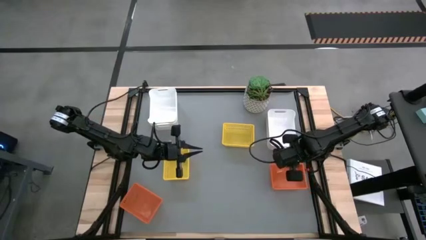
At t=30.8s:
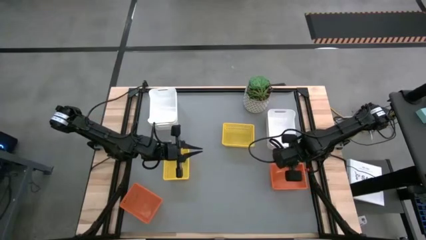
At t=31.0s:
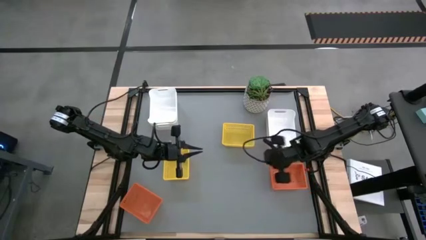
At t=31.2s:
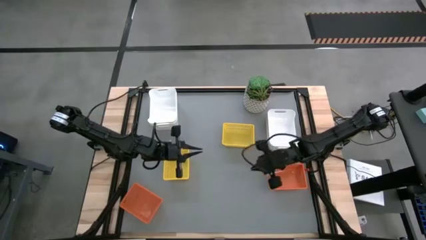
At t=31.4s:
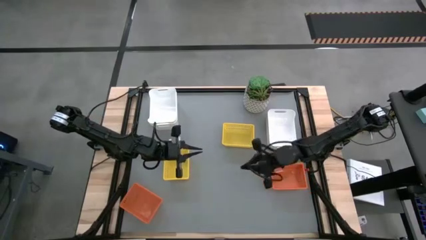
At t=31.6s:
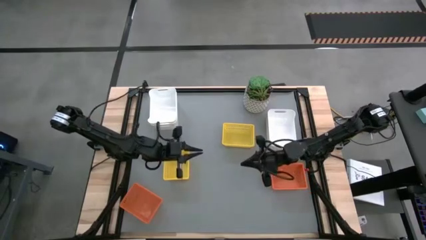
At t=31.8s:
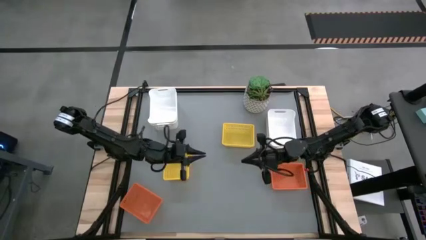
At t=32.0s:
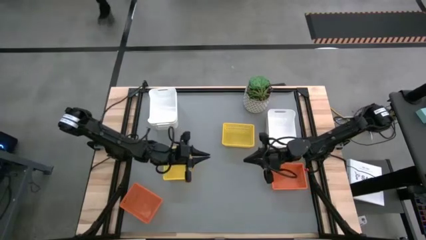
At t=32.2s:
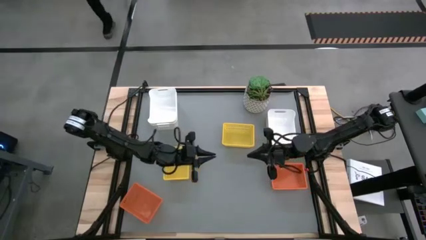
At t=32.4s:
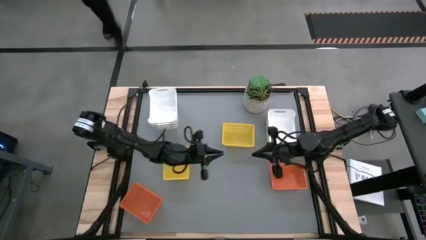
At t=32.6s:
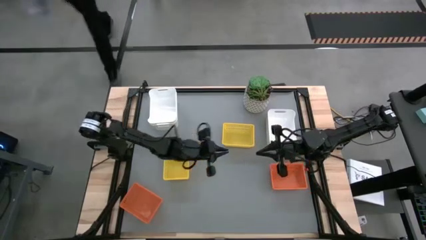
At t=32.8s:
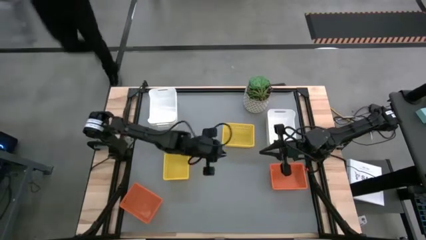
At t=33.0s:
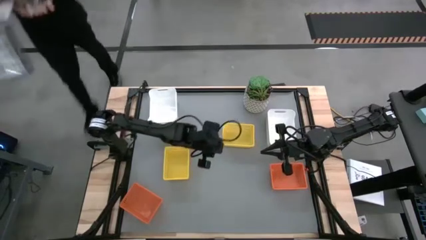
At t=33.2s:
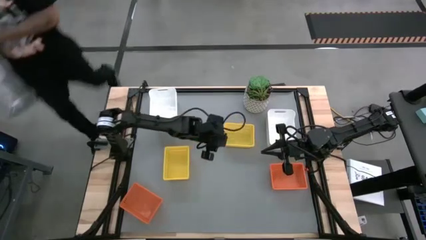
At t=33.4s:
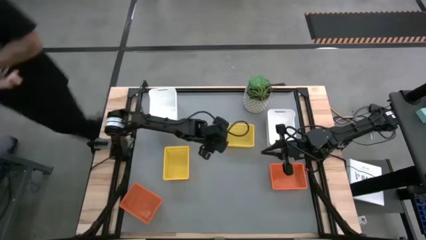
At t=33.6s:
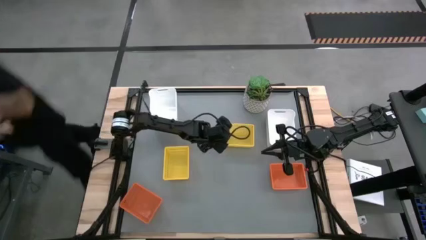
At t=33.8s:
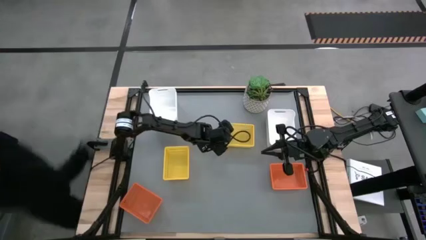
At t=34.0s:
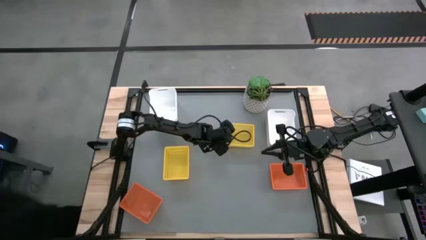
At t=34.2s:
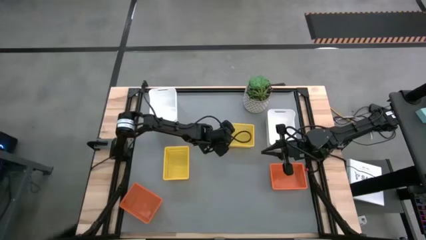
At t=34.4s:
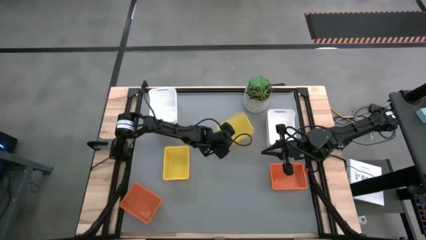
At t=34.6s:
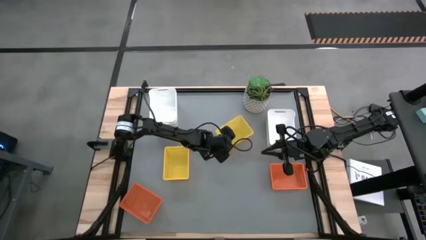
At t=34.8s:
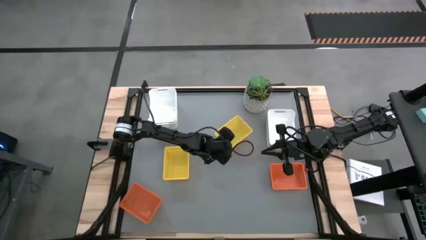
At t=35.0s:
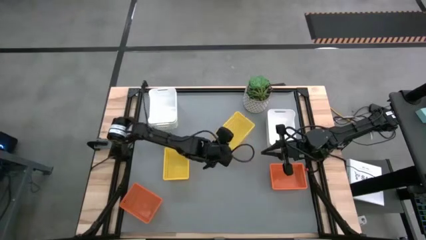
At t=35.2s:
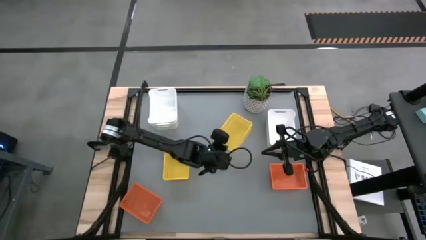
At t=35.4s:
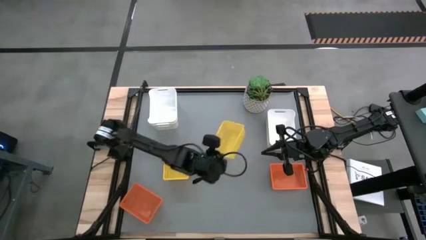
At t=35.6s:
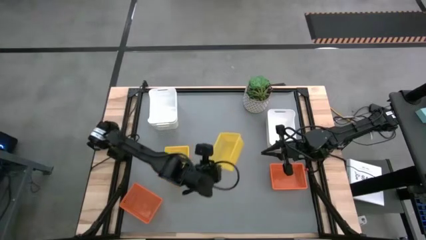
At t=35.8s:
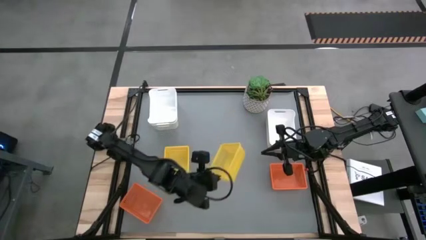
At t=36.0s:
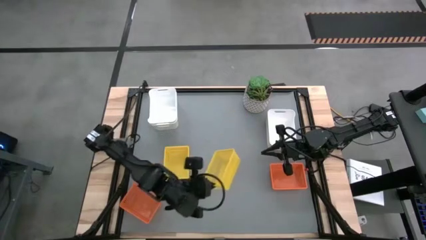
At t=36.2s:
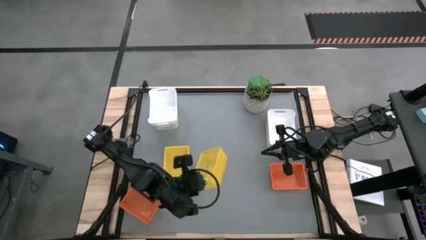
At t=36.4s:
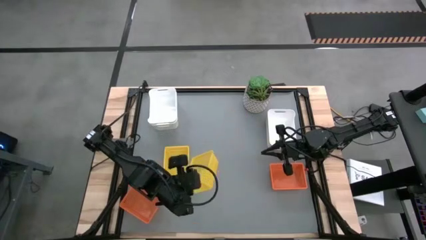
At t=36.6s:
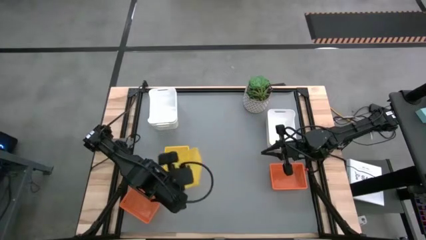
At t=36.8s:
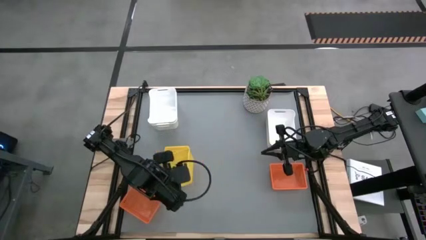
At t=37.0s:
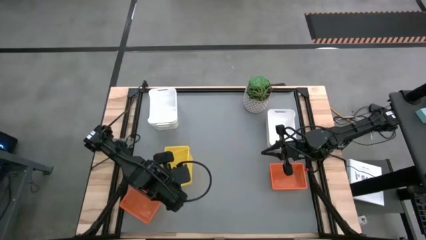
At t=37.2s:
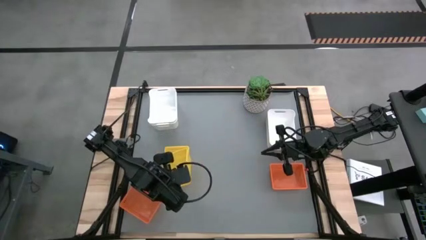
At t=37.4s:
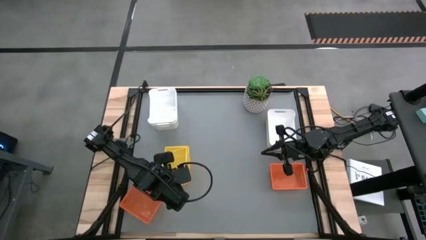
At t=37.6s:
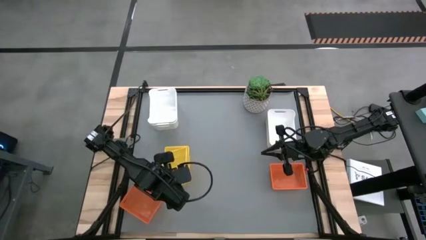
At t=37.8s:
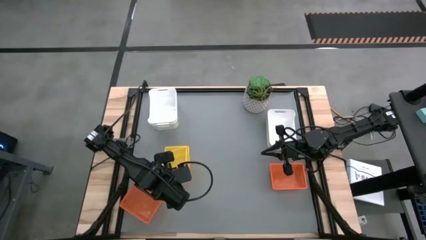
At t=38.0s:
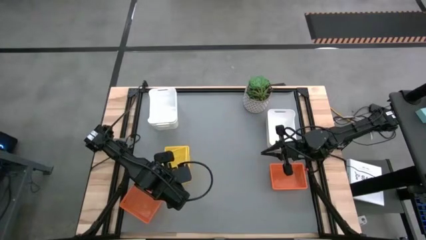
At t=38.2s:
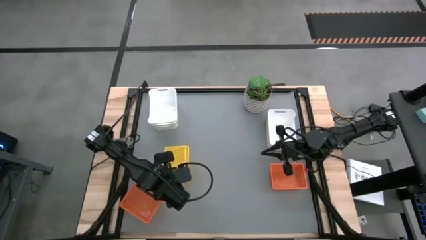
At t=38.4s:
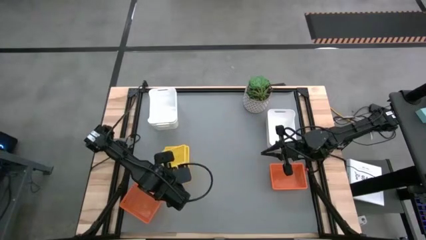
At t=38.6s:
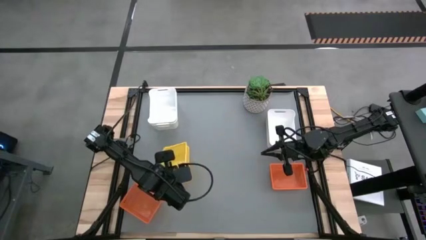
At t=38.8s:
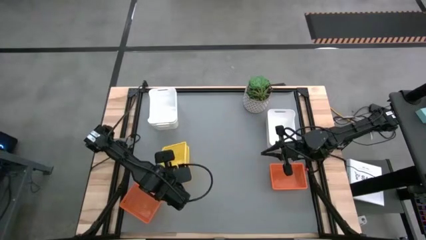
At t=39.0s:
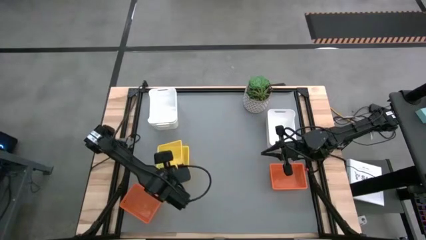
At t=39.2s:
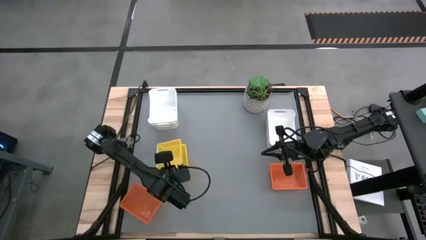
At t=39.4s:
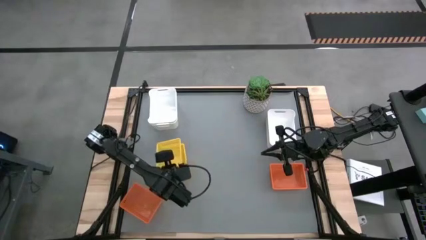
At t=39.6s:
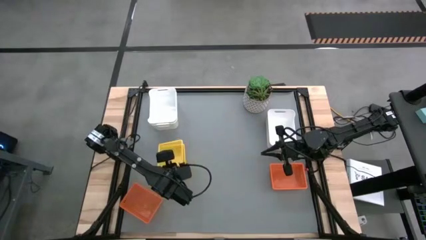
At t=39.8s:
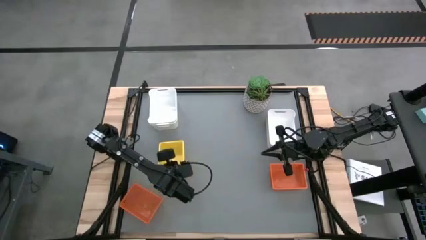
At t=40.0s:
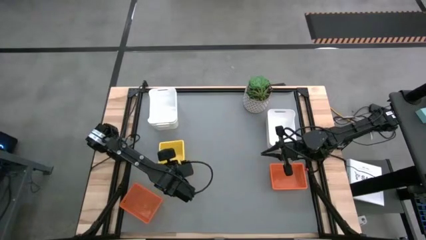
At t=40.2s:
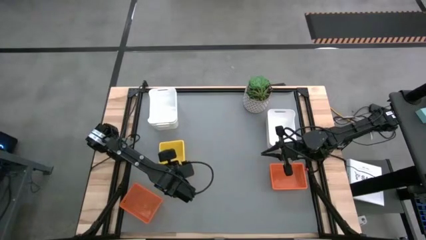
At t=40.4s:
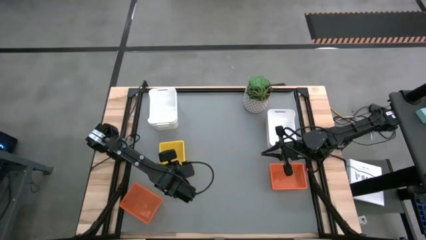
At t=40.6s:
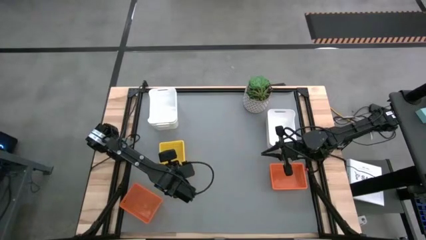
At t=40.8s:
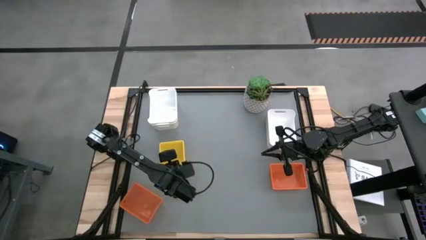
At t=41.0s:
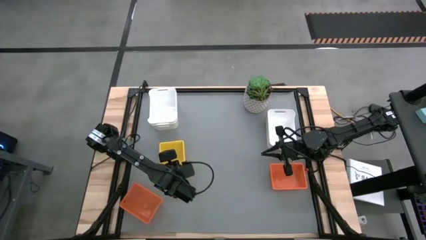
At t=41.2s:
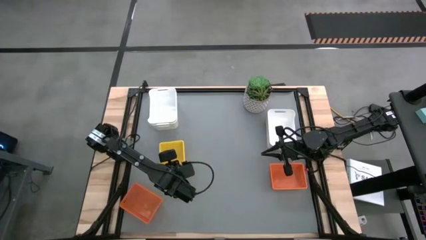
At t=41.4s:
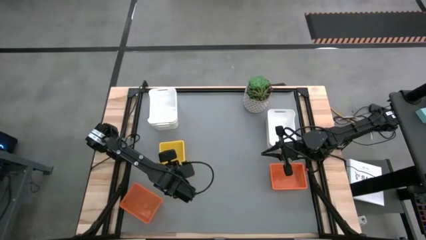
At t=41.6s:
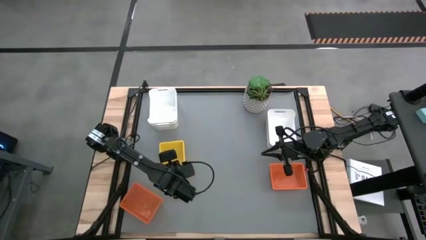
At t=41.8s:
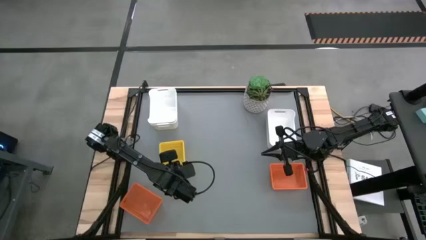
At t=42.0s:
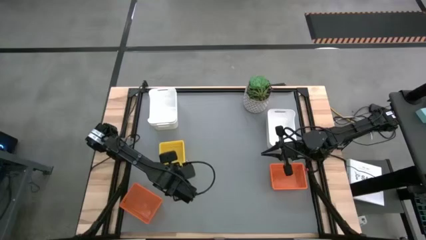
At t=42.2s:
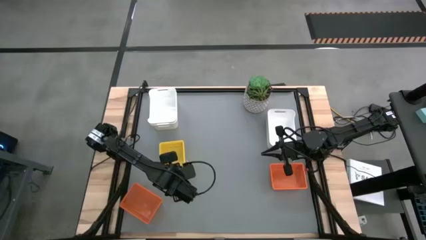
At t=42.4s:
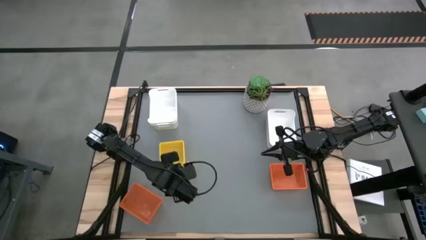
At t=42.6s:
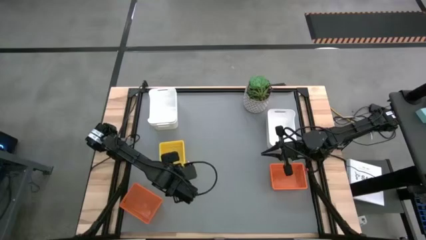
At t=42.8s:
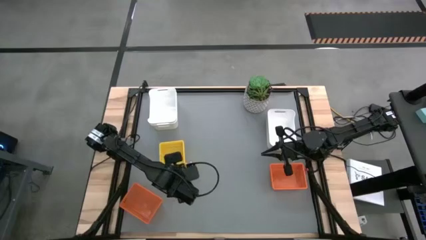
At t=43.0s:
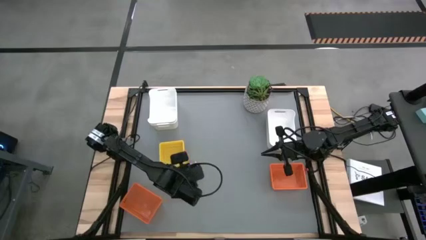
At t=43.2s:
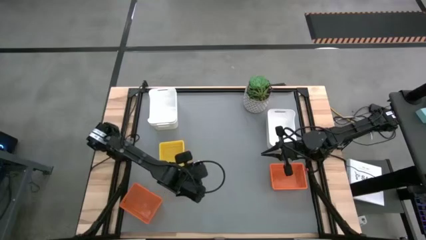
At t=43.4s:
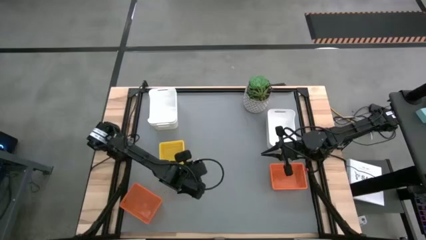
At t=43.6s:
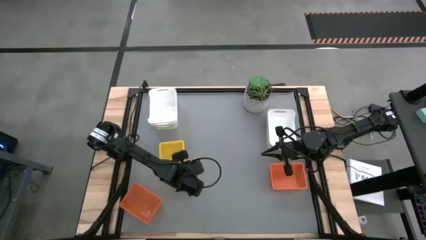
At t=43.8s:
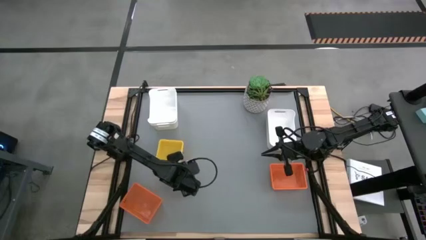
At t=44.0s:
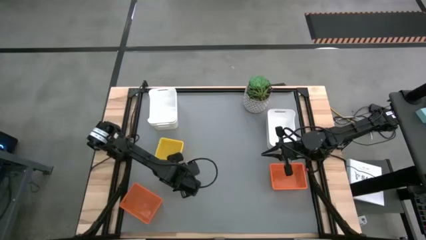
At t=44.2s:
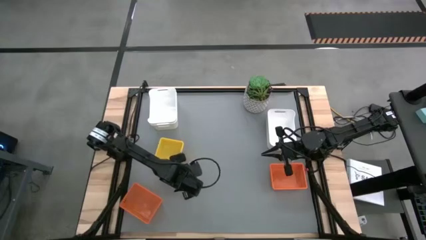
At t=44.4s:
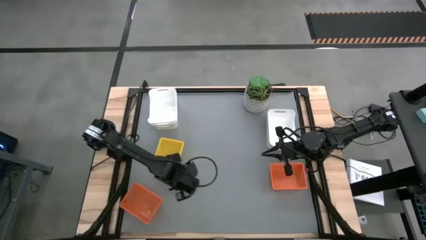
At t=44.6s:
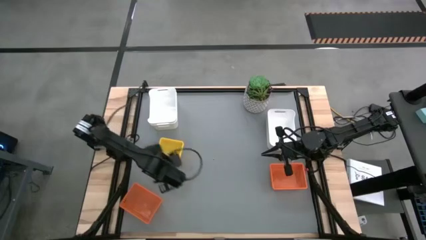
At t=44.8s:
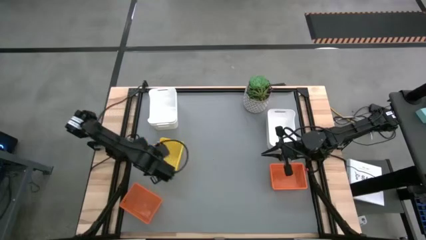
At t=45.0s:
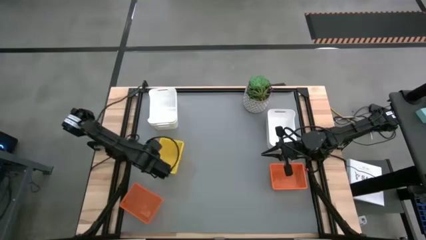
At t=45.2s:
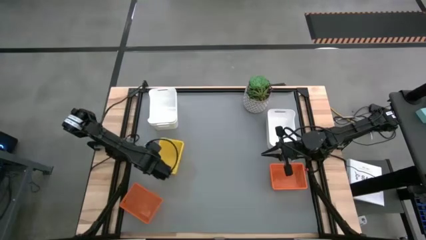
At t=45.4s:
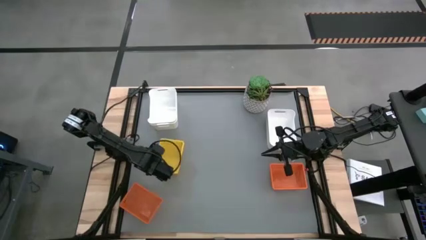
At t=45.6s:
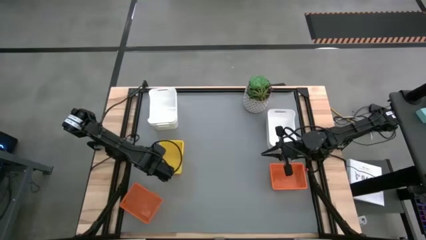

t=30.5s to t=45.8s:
Stack the top yellow bin on top of the bottom yellow bin
